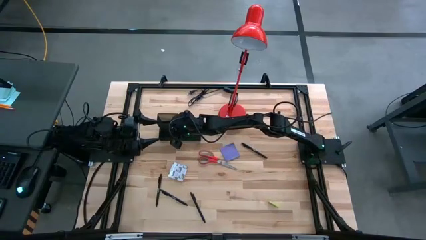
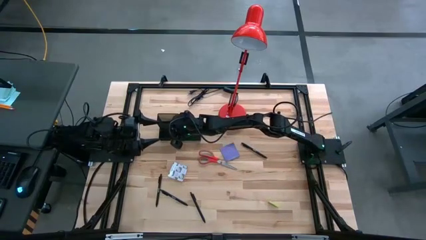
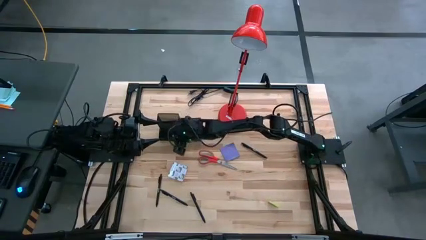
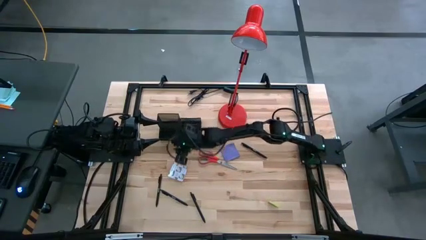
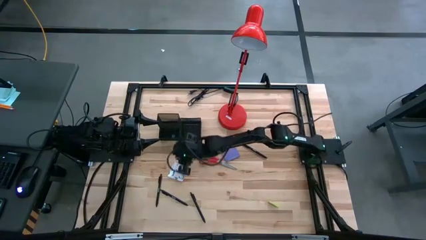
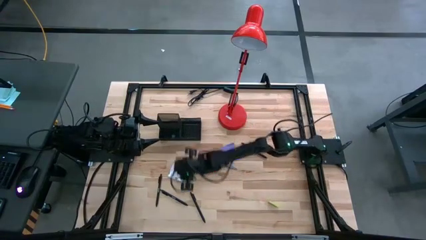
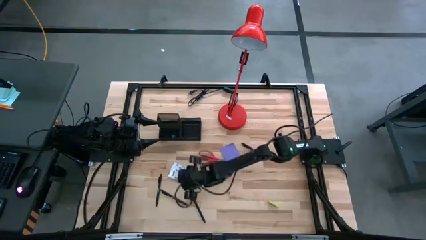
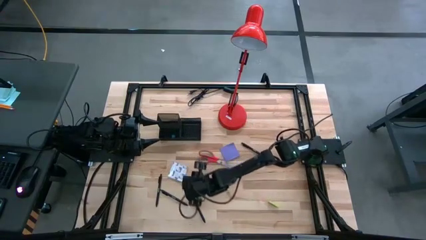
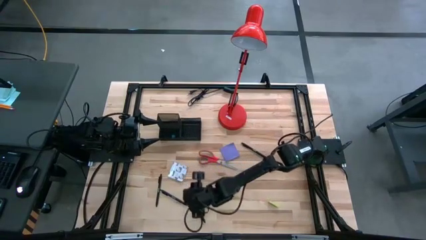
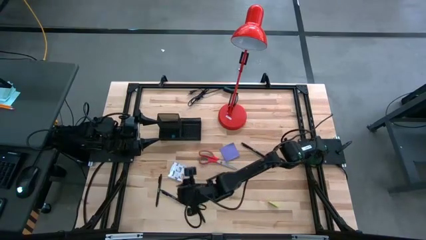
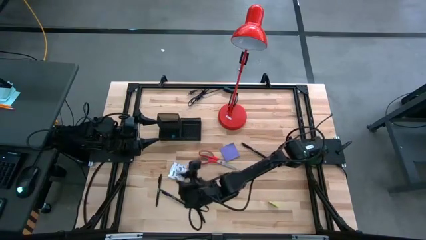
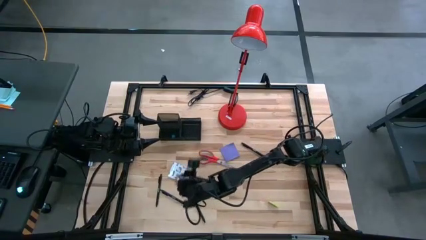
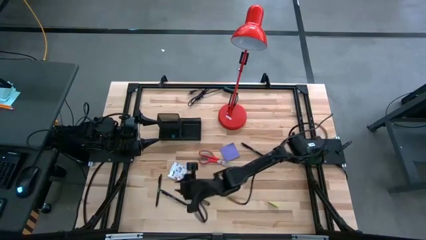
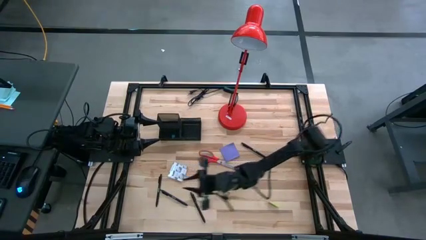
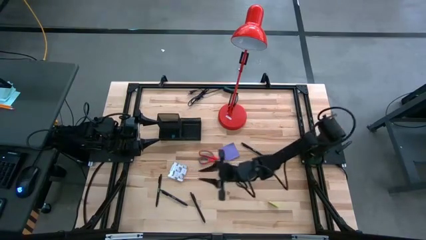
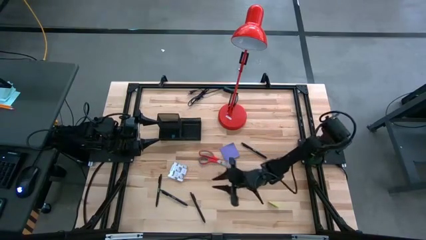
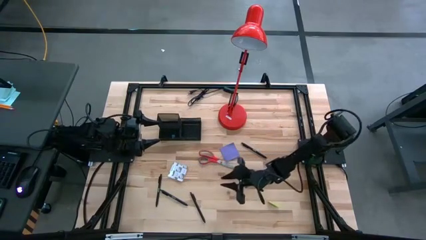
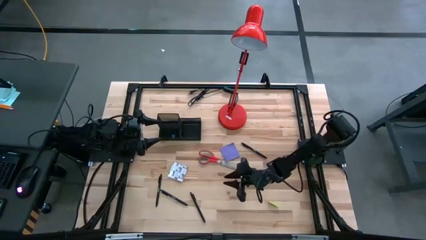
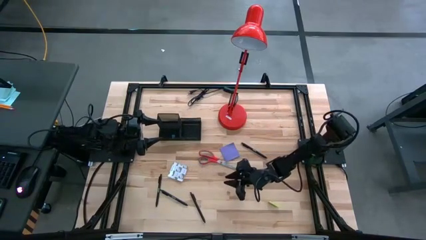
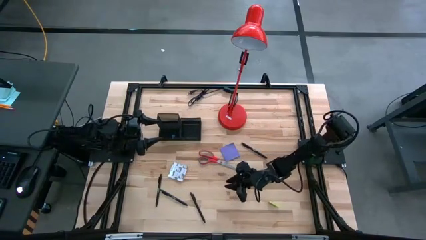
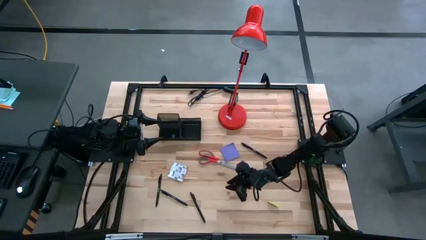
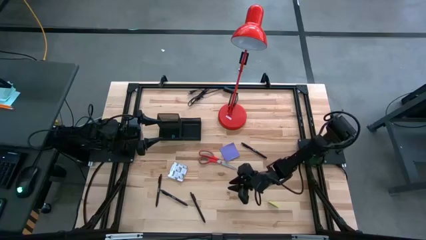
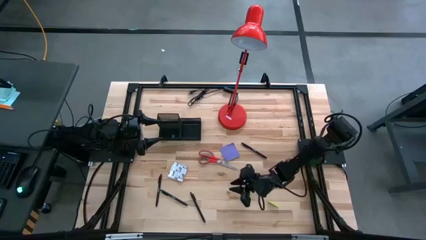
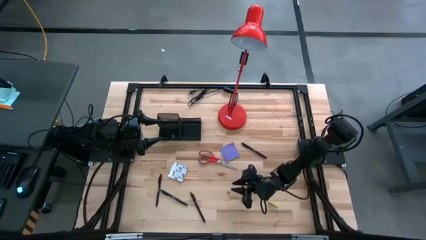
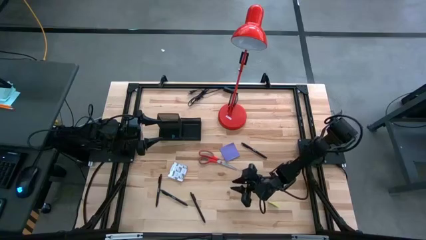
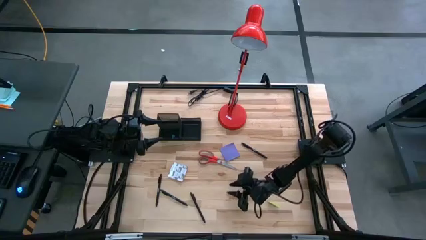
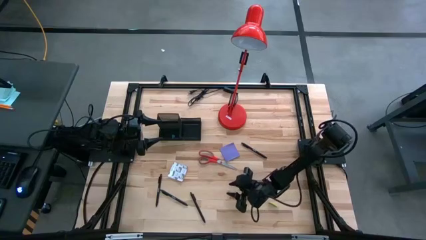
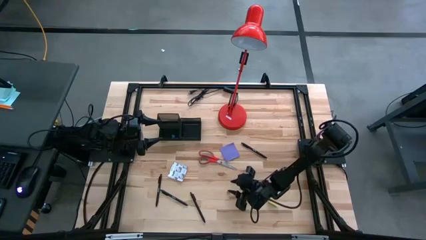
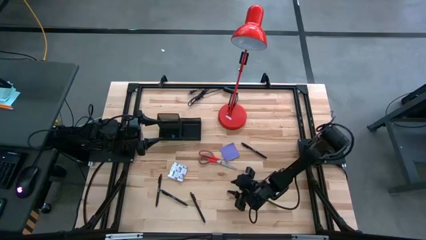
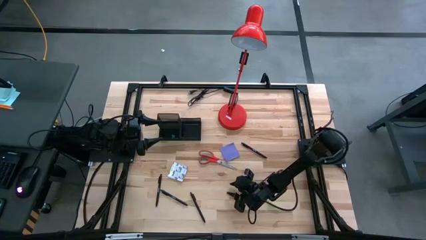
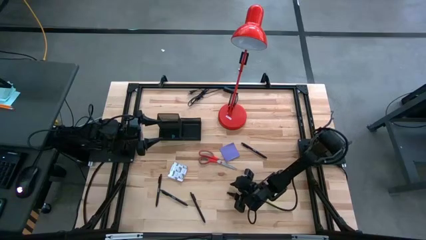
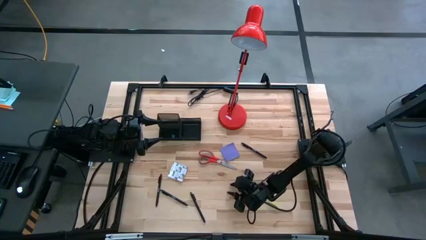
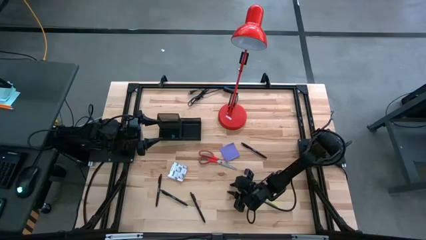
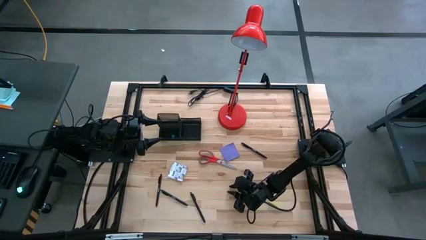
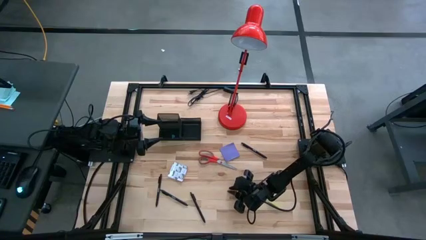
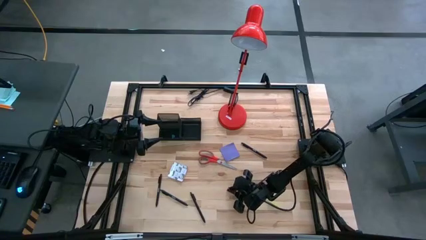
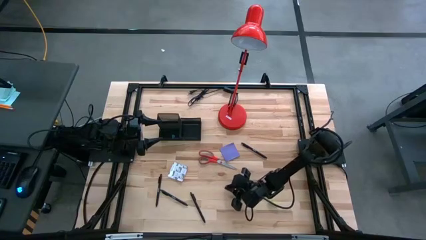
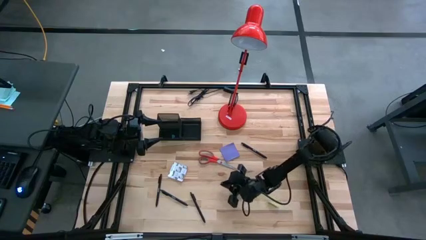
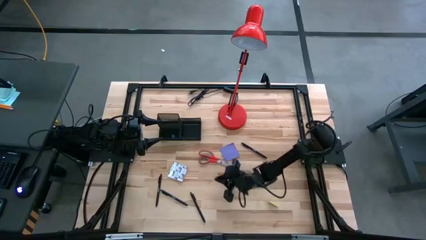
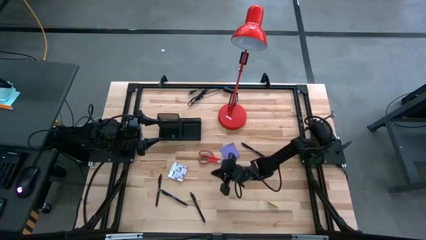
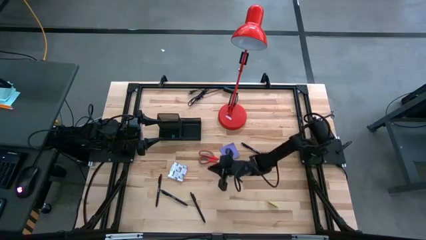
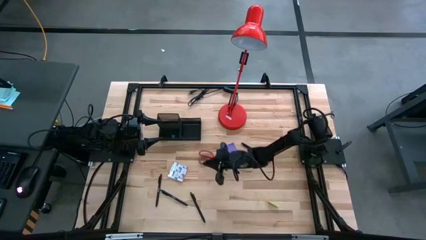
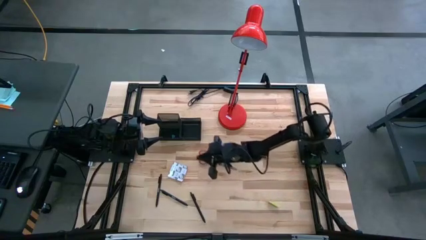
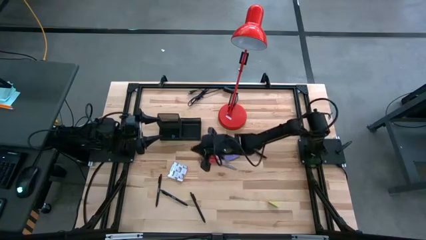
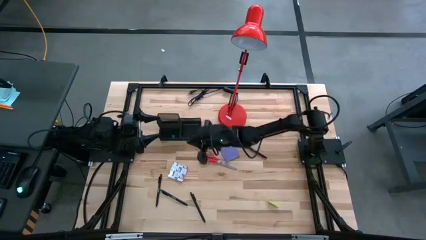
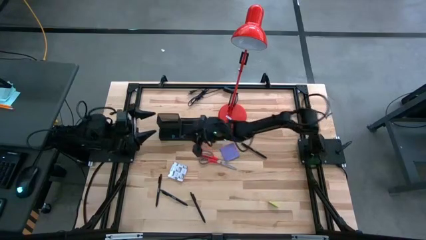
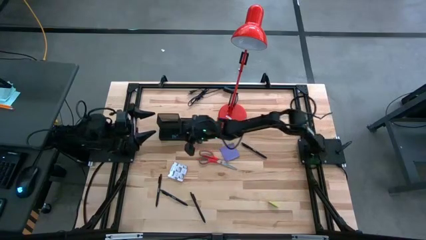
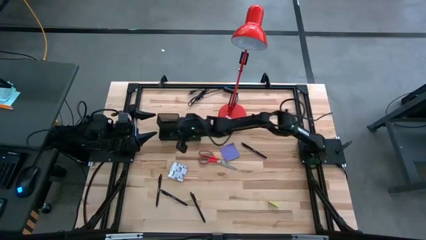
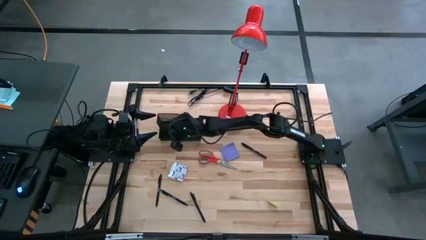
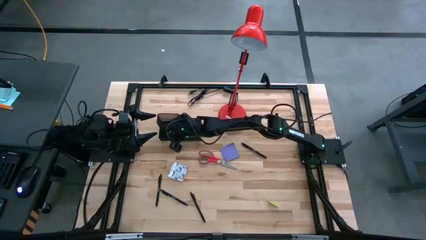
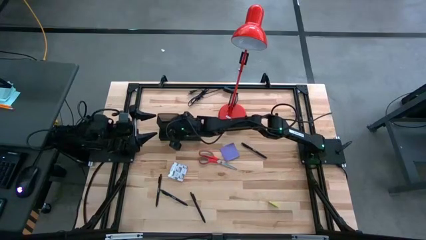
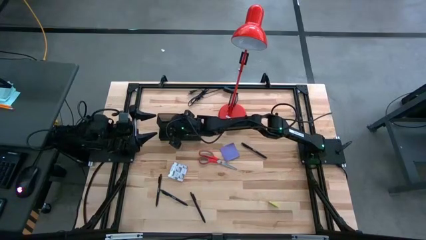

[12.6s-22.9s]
Task: Pick and place office supplies into organizer
Put the pink binder clip into the black desk organizer
